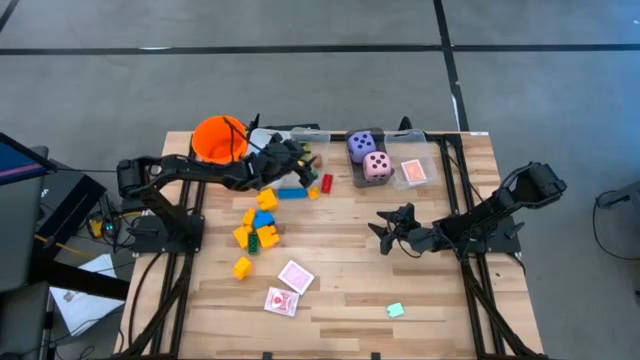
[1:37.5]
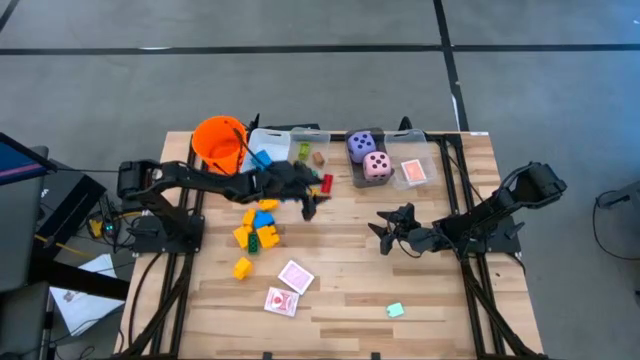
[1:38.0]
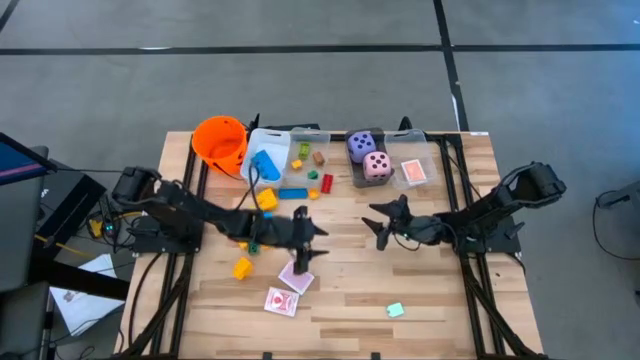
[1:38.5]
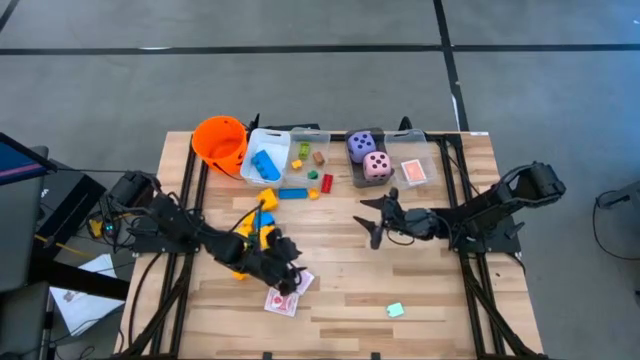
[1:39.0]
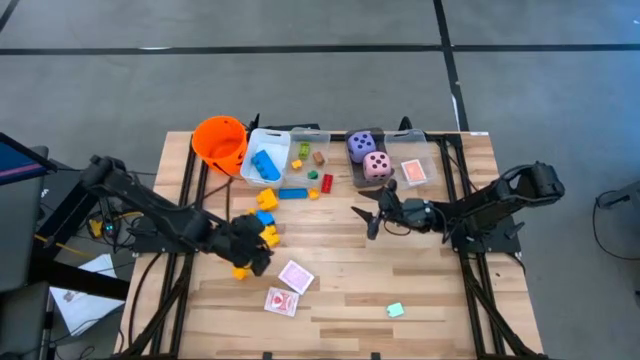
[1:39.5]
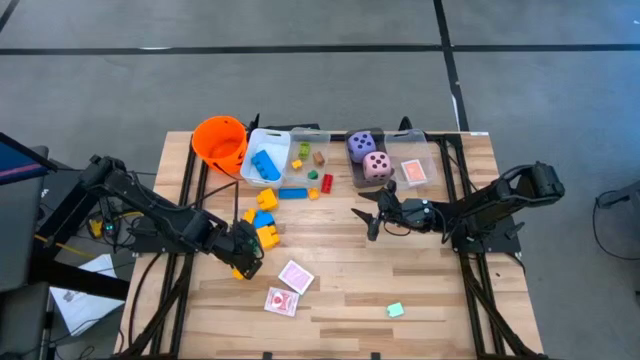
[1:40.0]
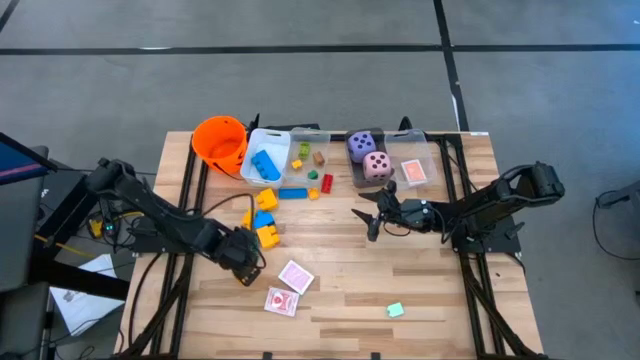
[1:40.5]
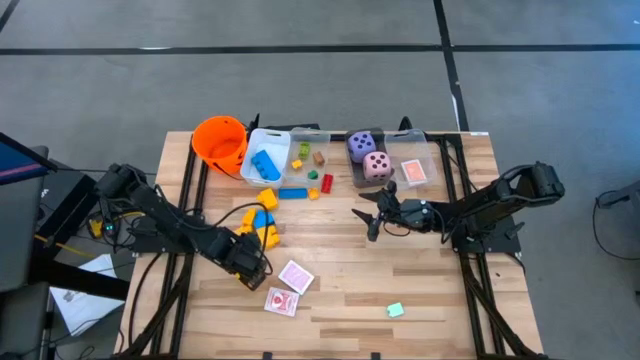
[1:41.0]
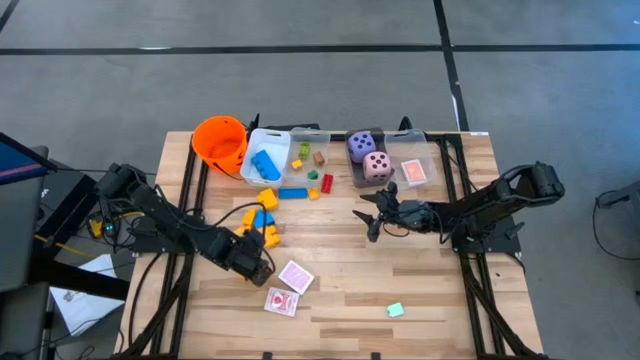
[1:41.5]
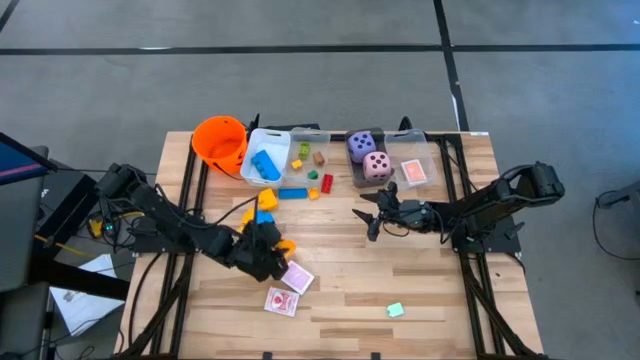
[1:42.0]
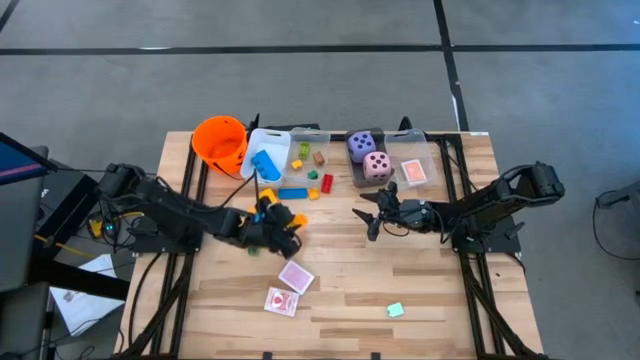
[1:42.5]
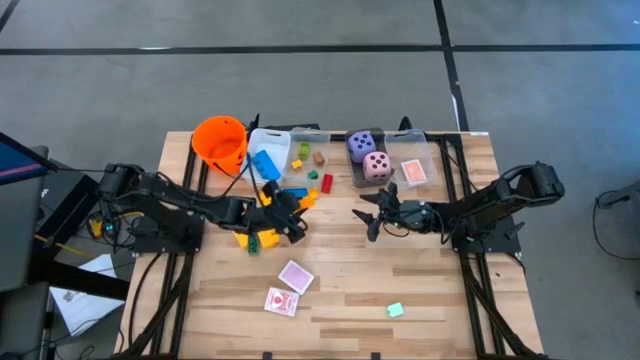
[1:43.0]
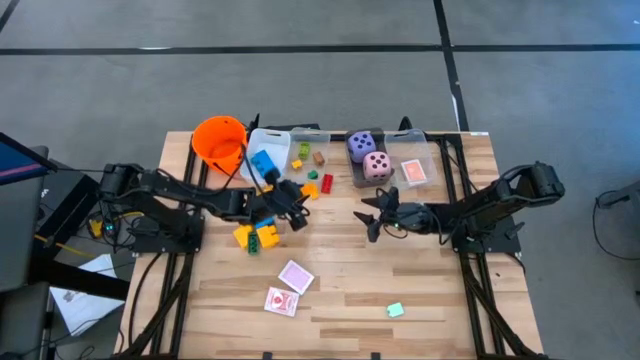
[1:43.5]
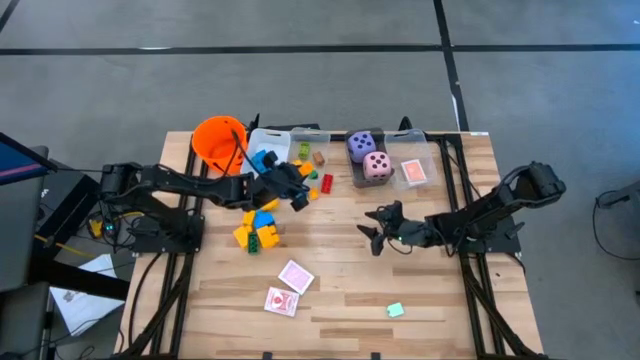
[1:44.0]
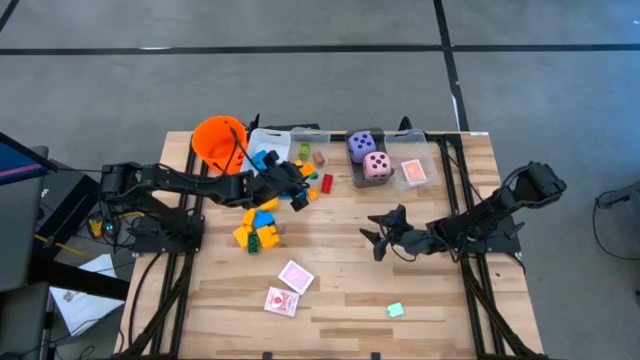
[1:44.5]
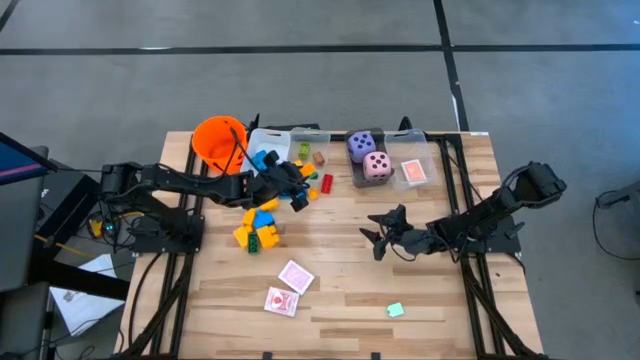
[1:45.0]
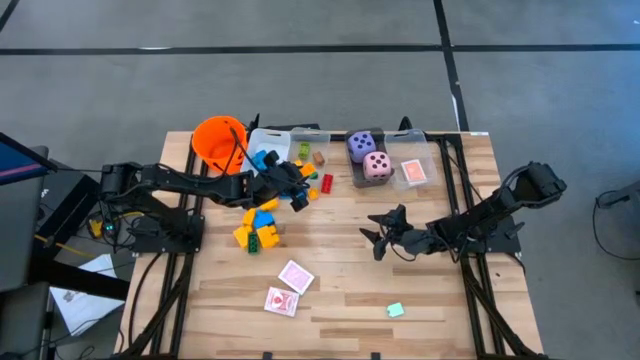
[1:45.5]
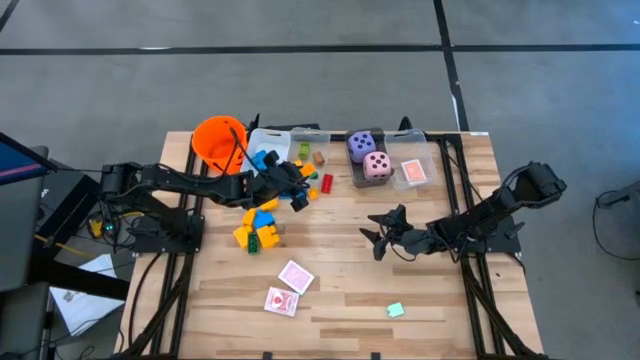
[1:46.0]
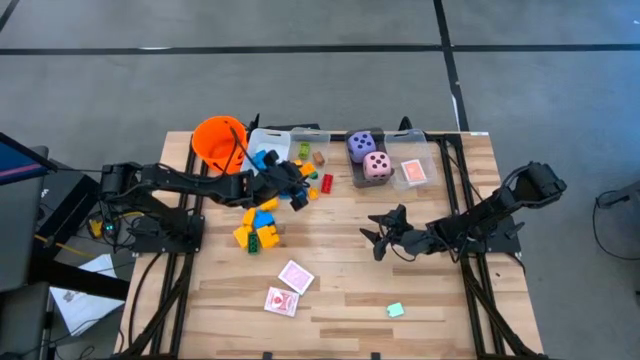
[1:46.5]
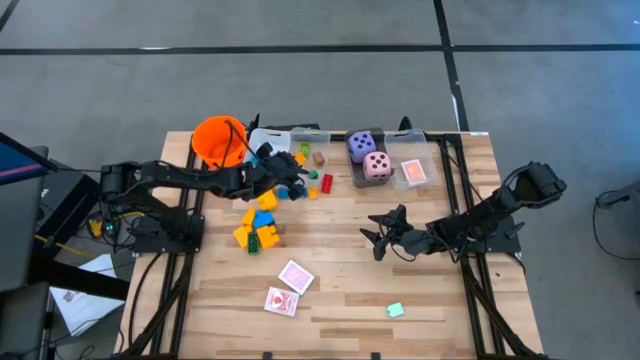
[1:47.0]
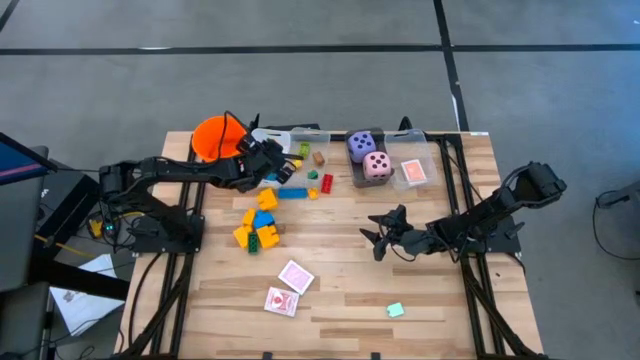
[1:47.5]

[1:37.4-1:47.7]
Task: Pick & Place Toys
Put the large yellow game piece into the white bin

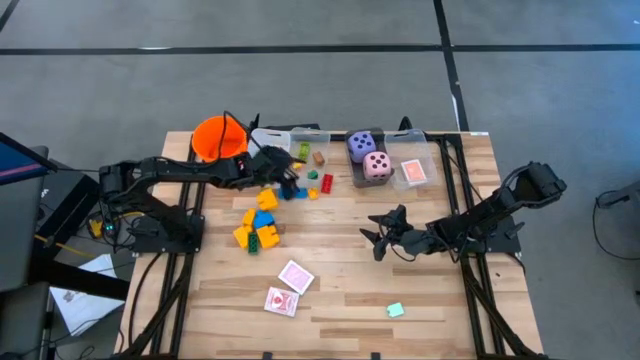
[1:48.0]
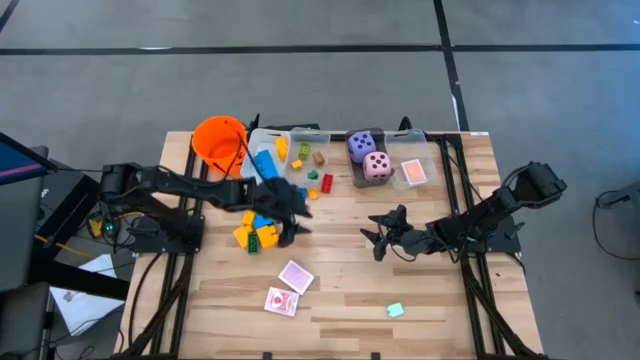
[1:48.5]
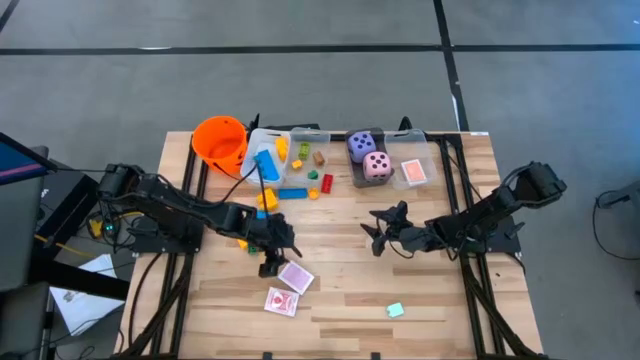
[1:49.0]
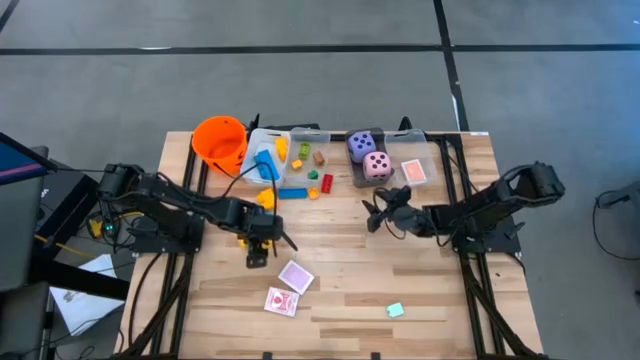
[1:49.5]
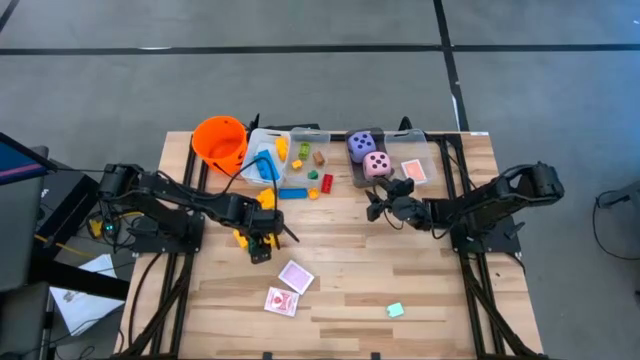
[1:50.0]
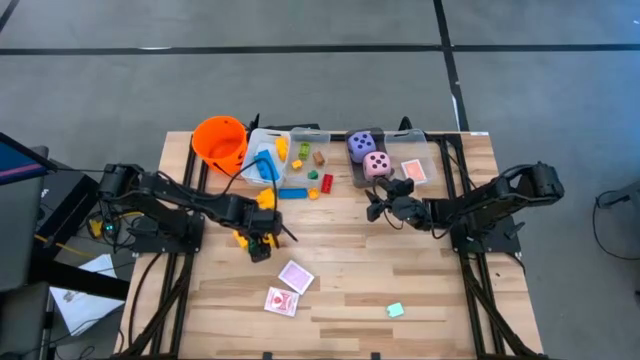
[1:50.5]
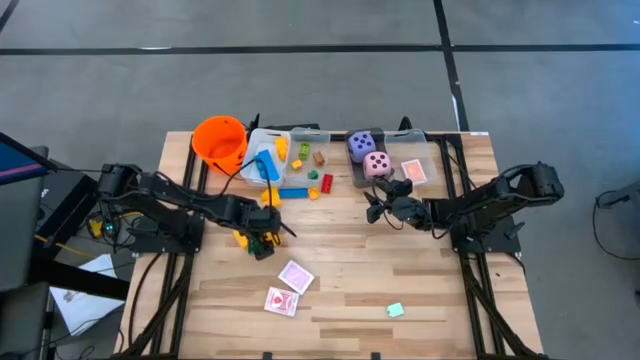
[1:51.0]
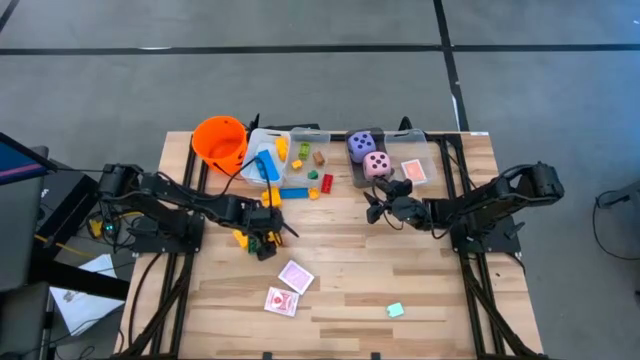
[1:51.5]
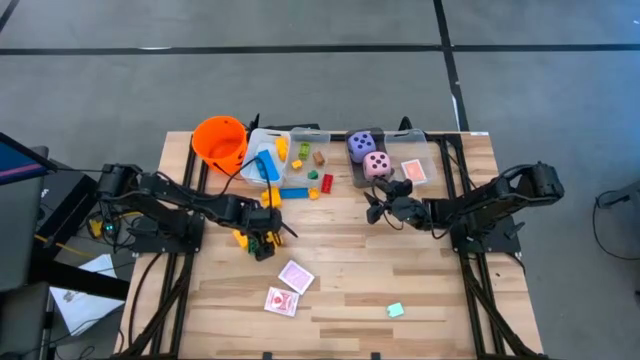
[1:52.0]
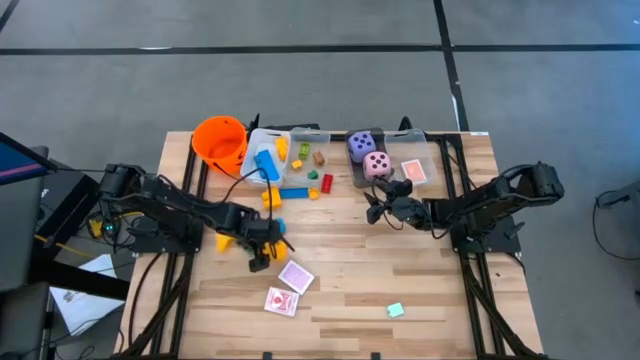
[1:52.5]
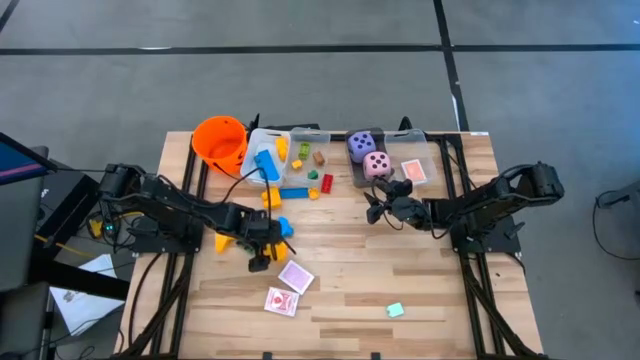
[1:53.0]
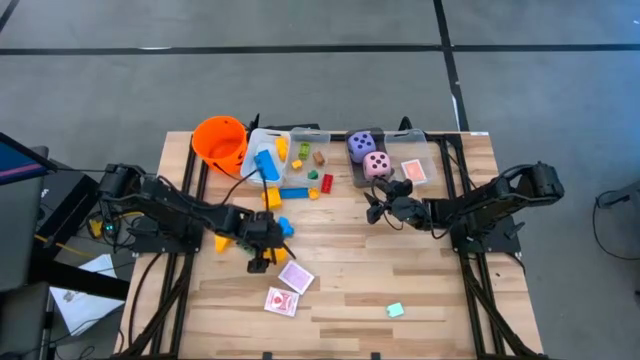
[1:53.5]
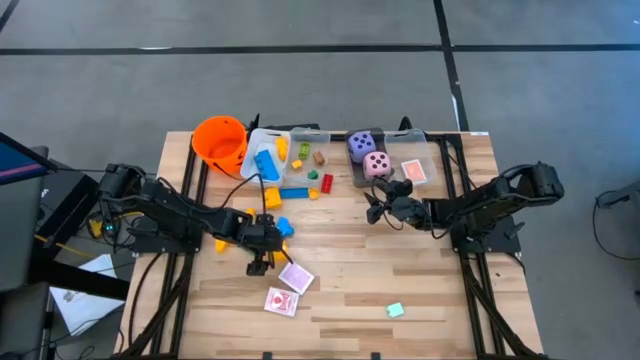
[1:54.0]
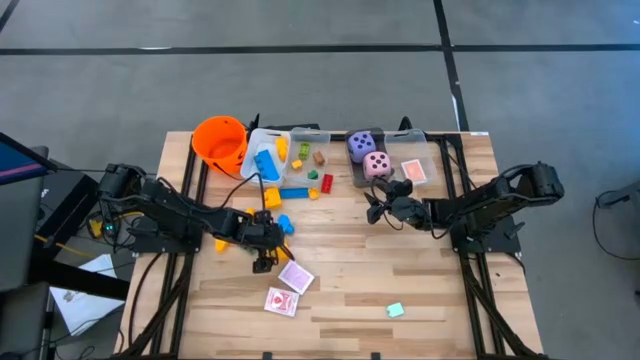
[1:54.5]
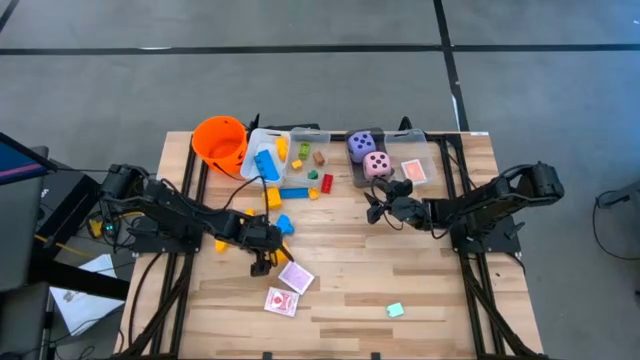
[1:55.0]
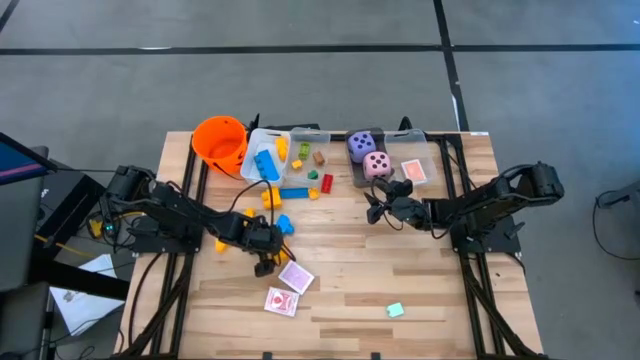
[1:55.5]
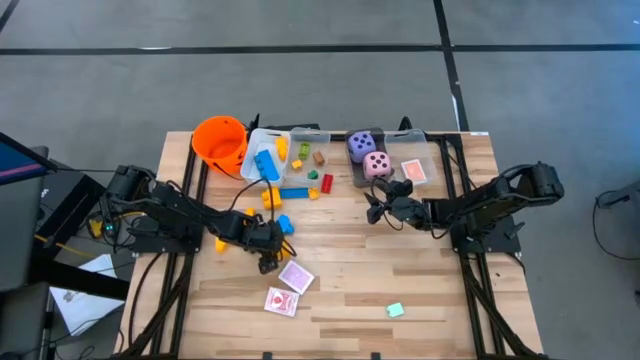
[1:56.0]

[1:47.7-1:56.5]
Put the large yellow game piece into the white bin

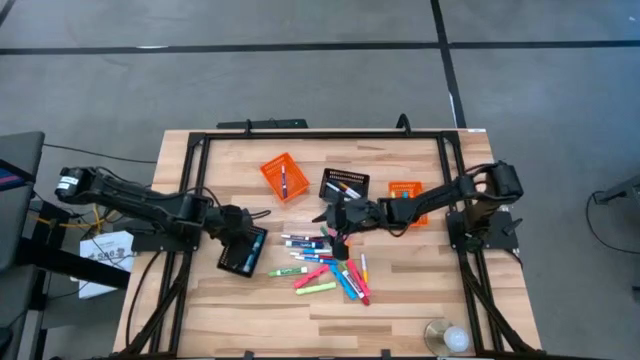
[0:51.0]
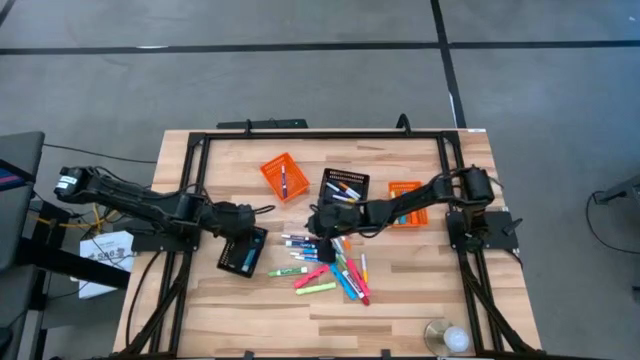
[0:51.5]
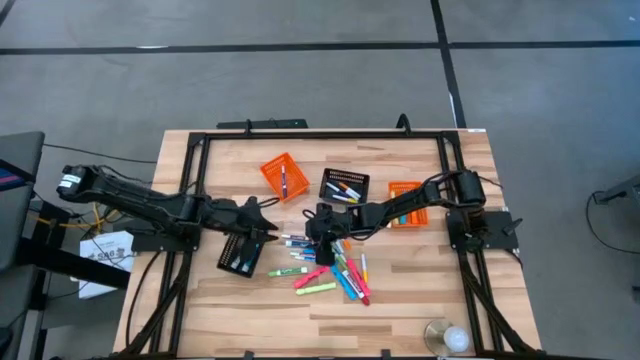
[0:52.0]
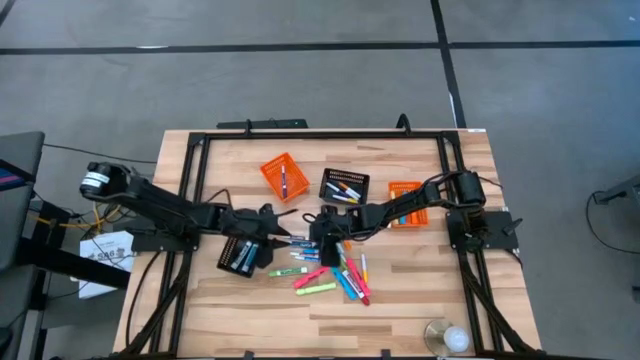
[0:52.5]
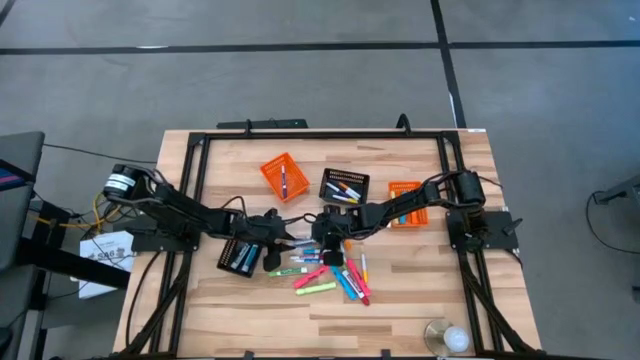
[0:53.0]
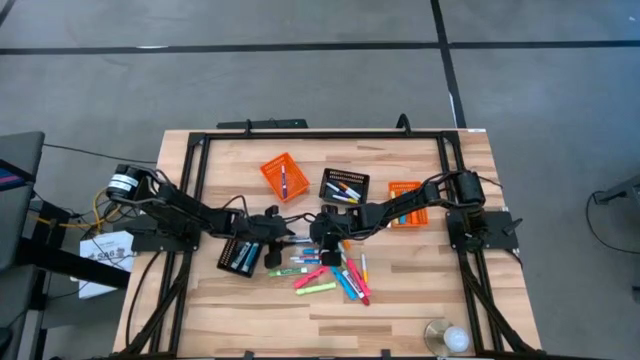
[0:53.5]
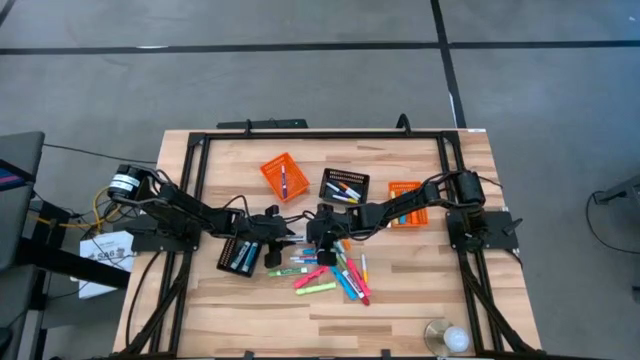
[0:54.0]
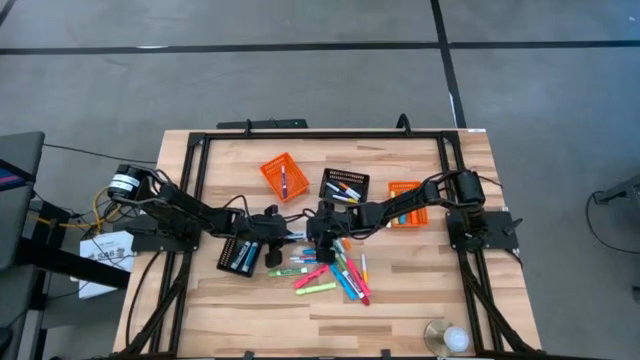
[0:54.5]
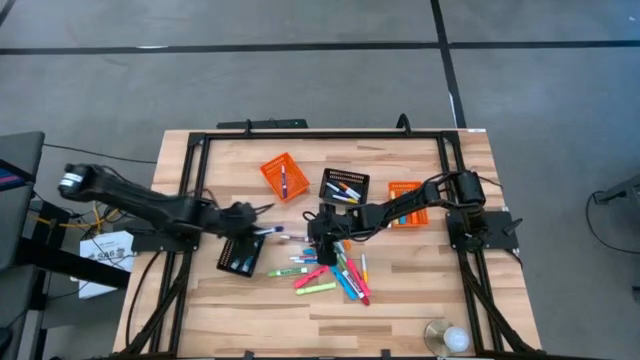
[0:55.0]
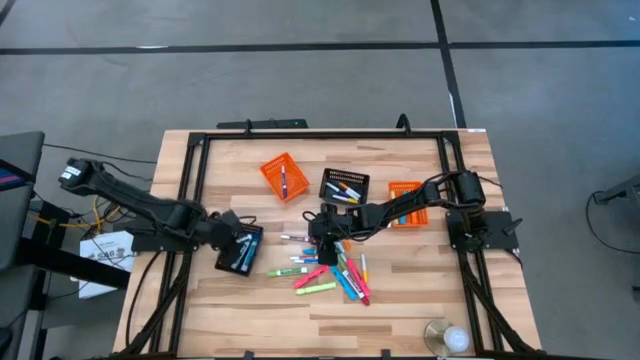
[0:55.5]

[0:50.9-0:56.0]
Task: Pick & Place Markers
Put the blue marker into the bottom black bin
